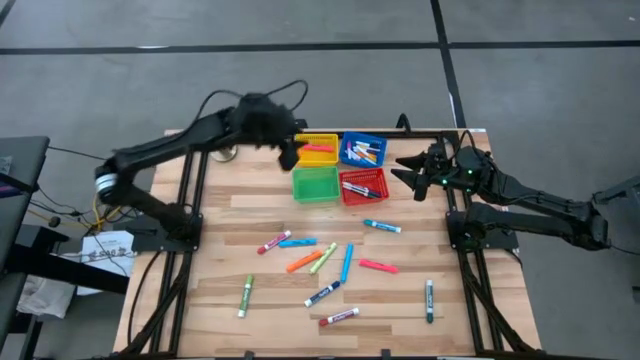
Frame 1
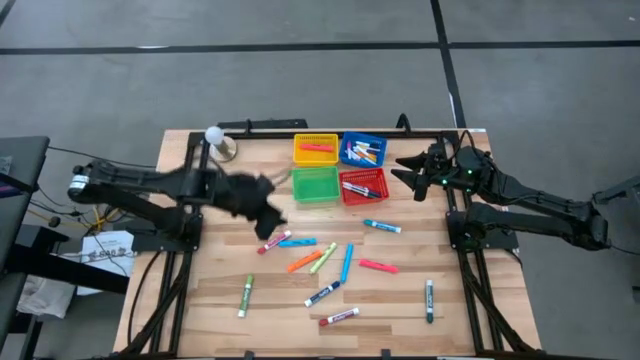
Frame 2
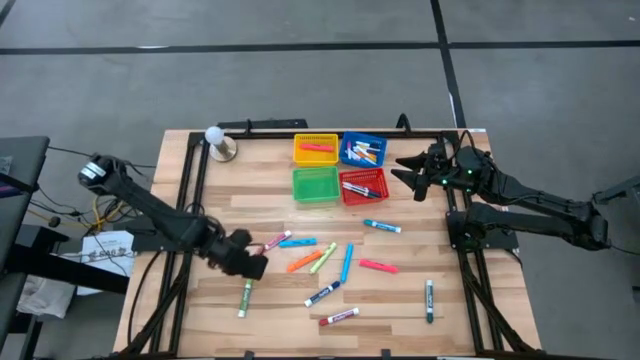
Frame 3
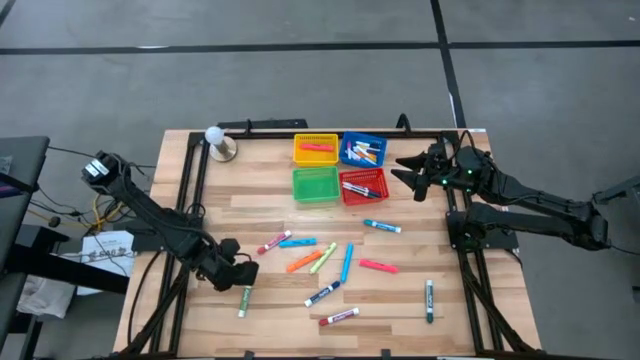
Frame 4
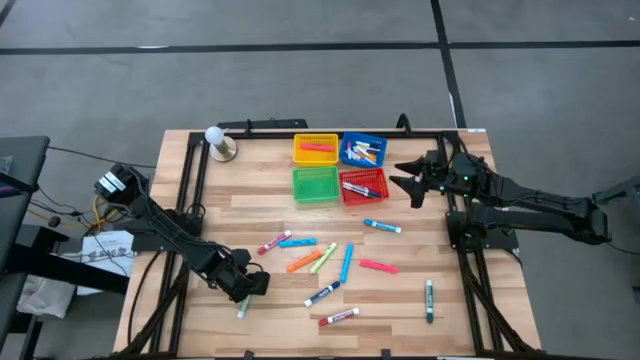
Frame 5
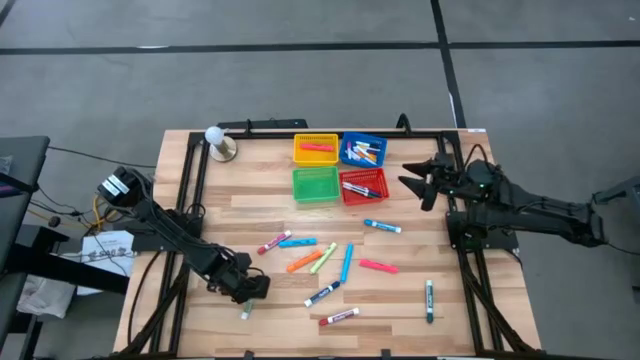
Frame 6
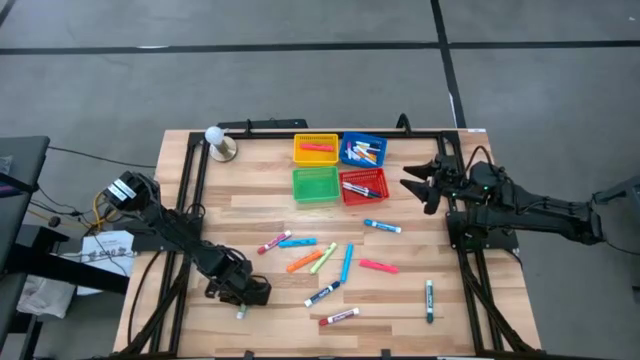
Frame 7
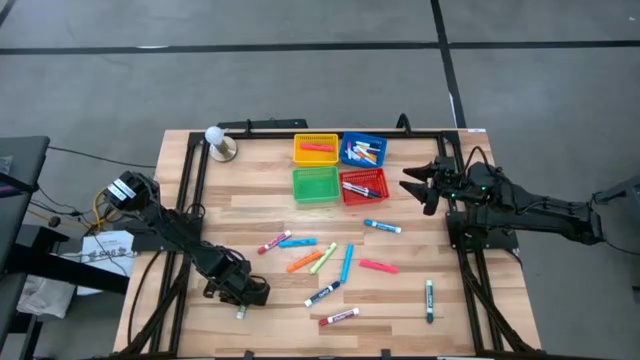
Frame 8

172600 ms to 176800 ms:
Task: Pick & Place Markers
Put the light blue highlighter into the yellow bin

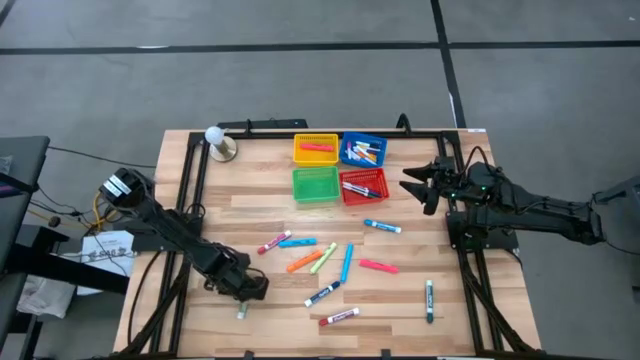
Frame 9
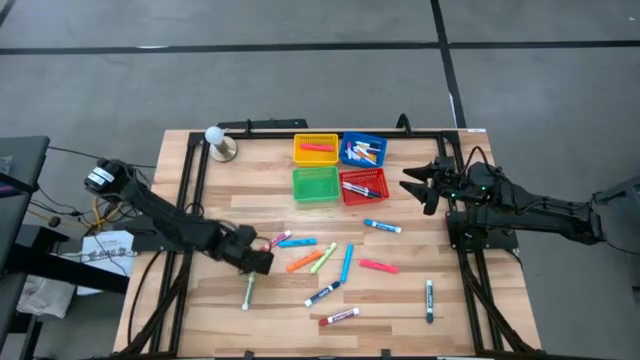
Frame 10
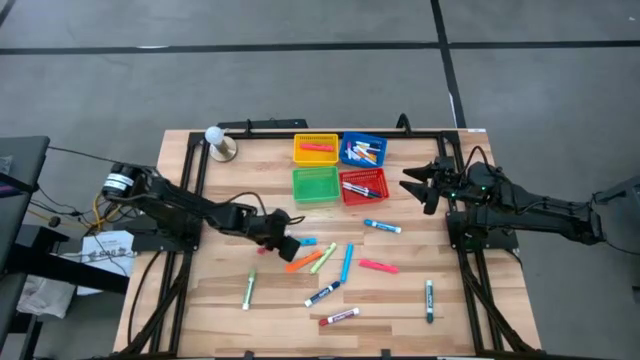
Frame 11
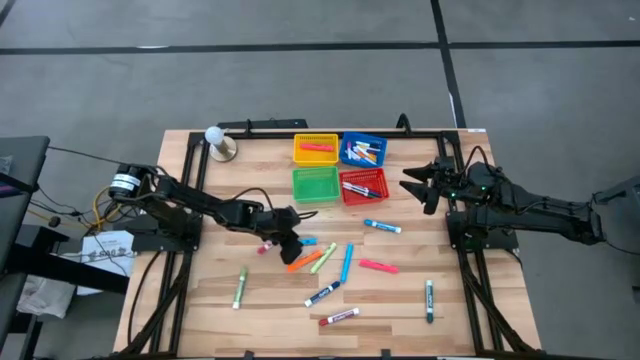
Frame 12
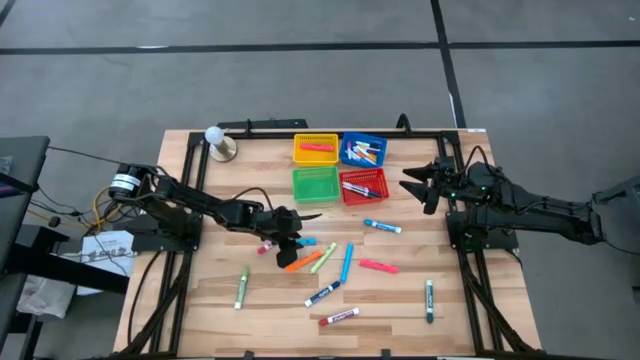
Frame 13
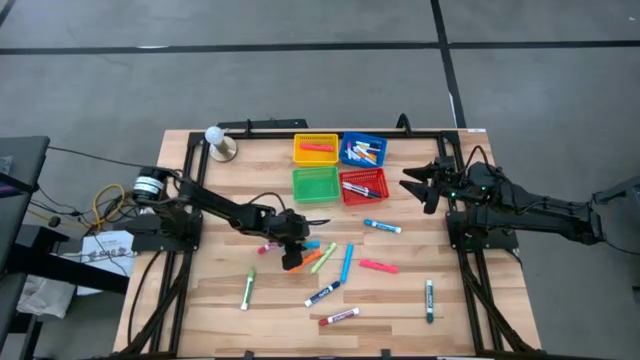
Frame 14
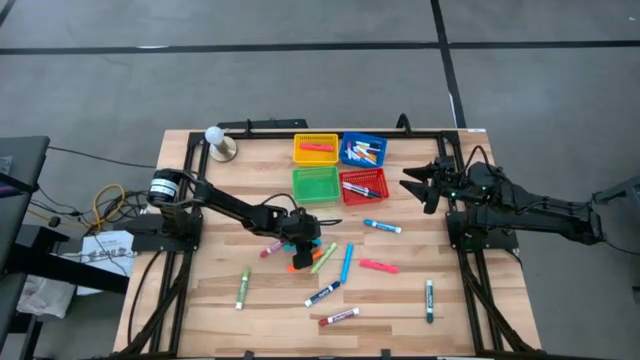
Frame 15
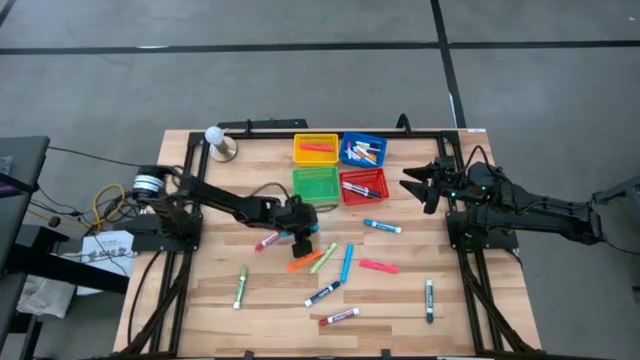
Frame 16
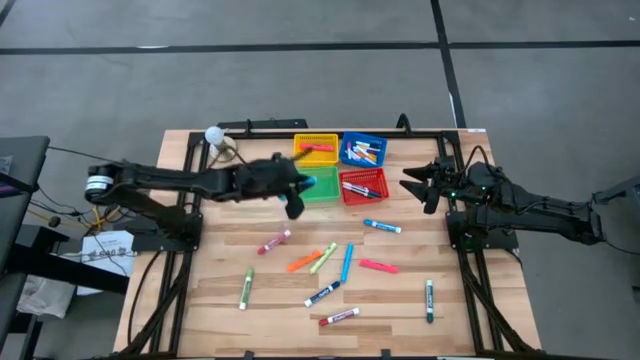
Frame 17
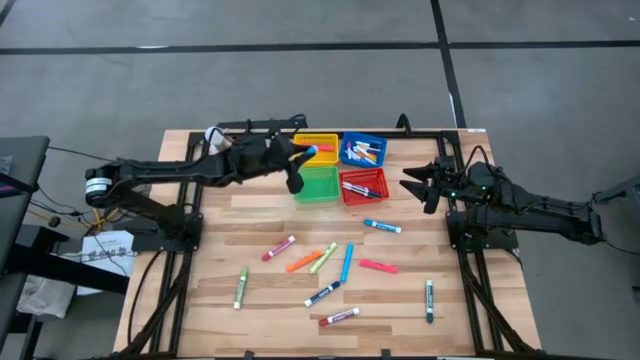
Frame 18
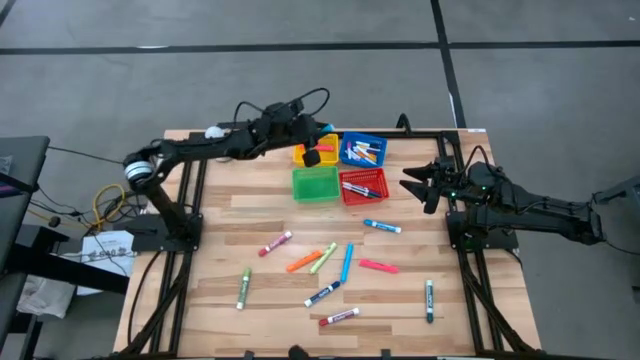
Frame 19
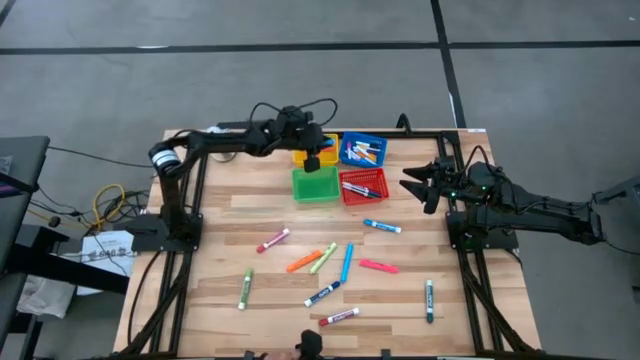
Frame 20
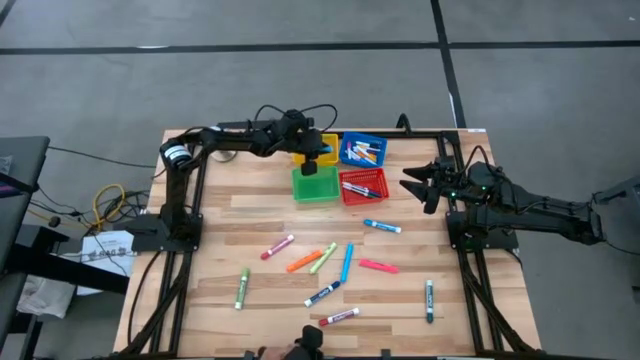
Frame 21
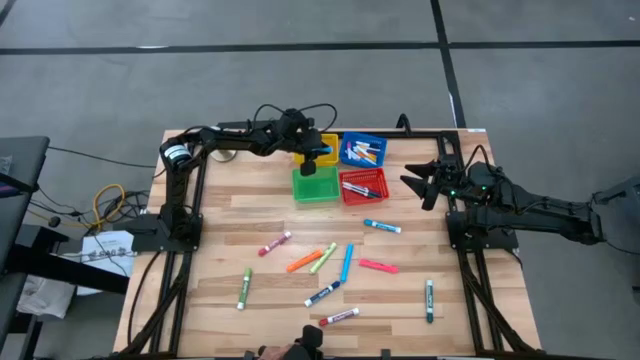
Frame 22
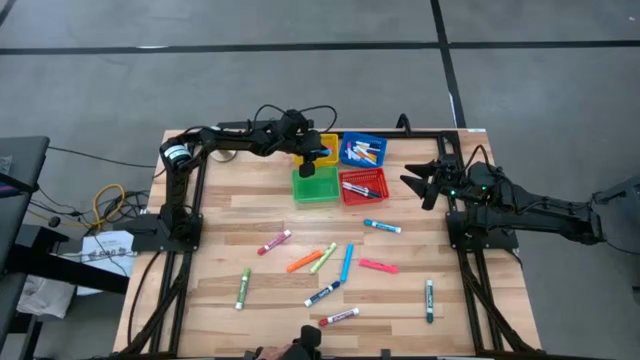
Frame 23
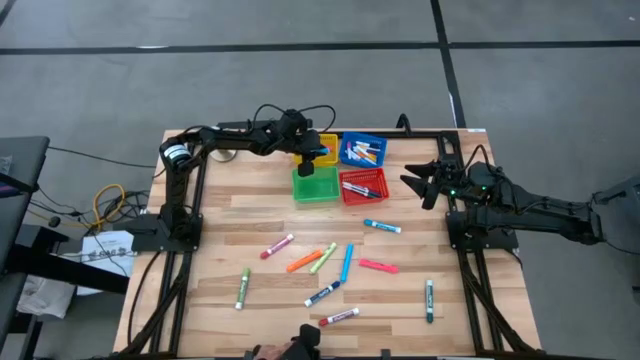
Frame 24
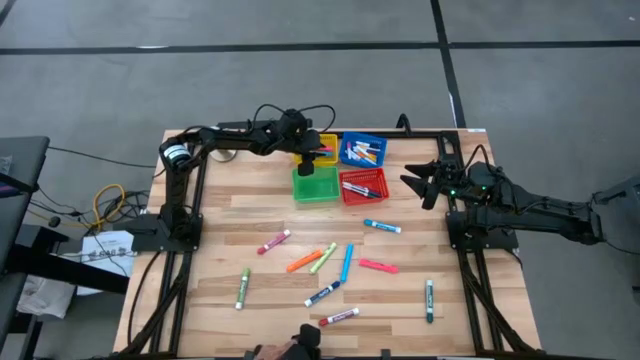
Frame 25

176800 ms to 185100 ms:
Put the light blue highlighter into the yellow bin

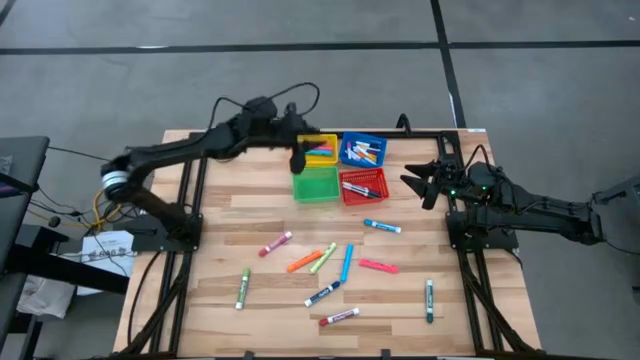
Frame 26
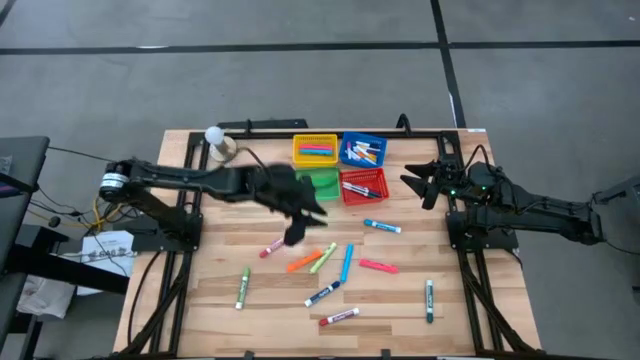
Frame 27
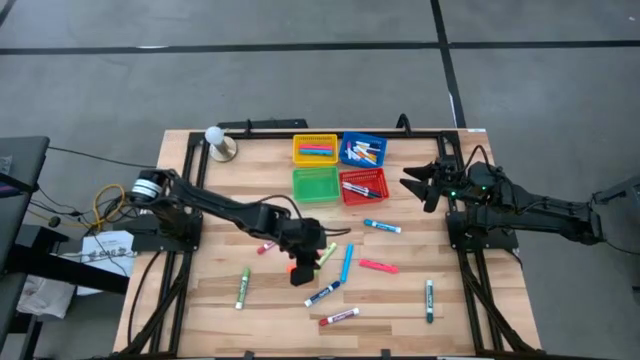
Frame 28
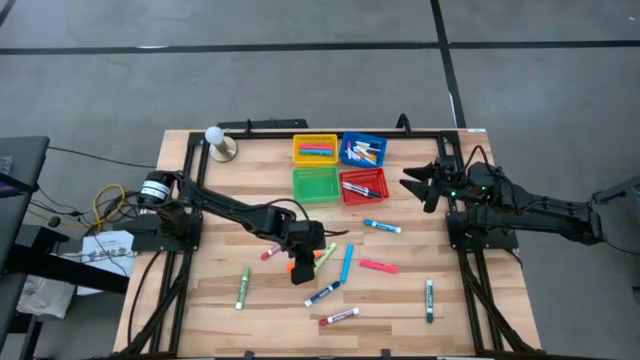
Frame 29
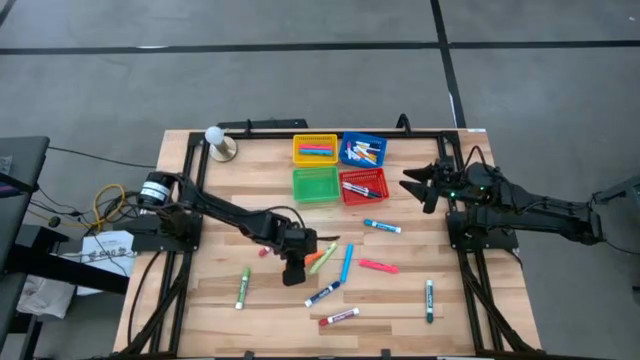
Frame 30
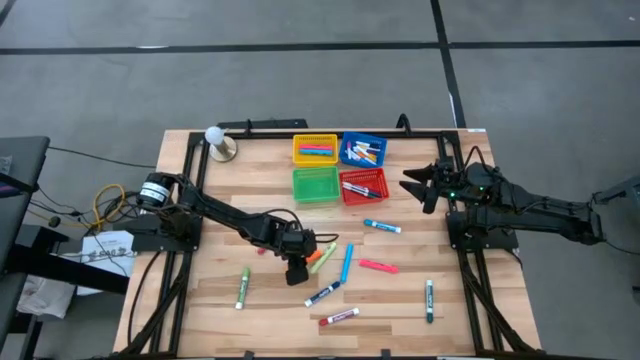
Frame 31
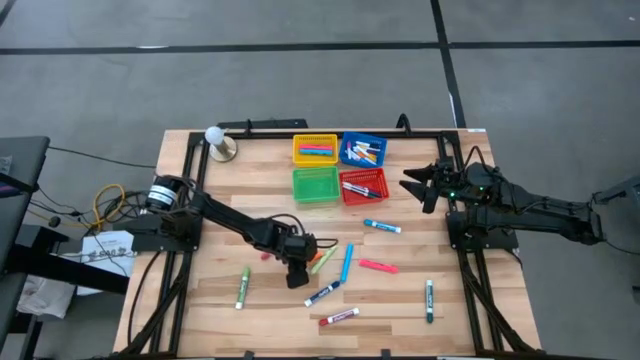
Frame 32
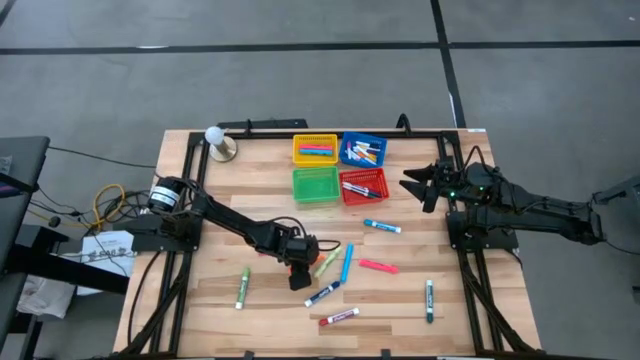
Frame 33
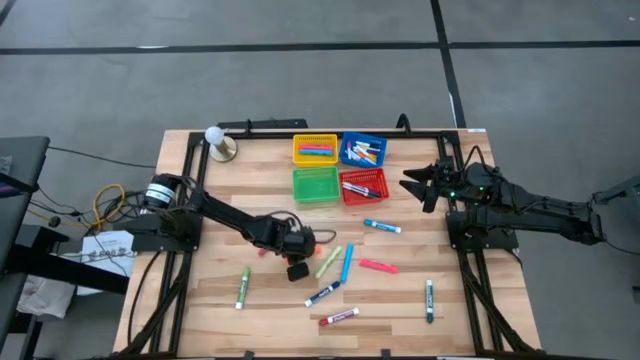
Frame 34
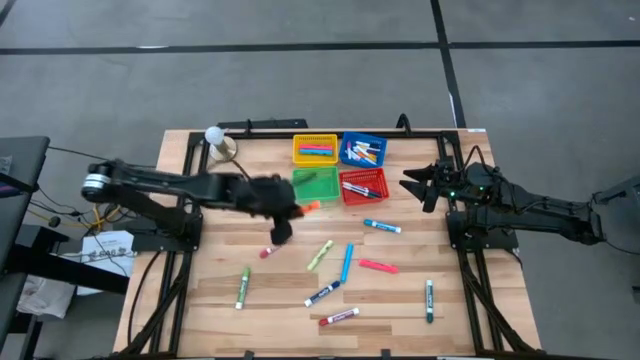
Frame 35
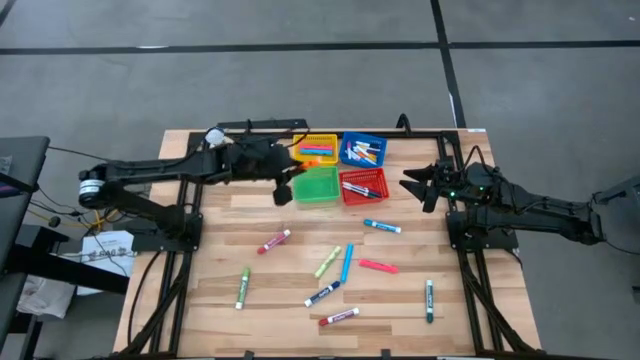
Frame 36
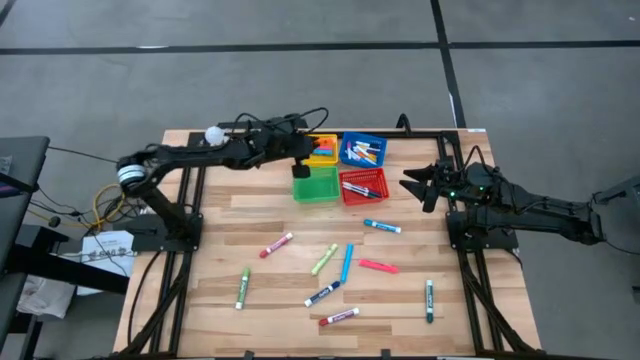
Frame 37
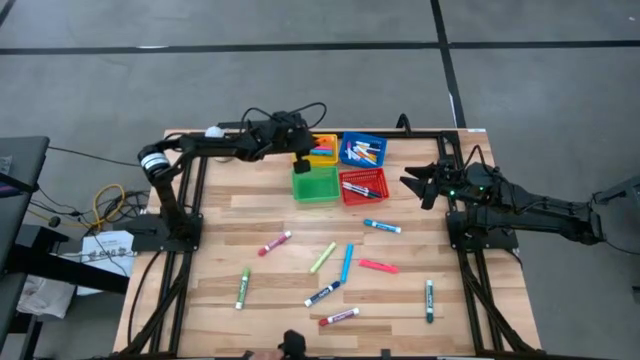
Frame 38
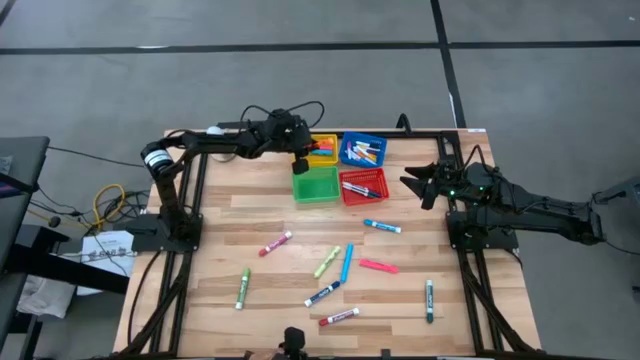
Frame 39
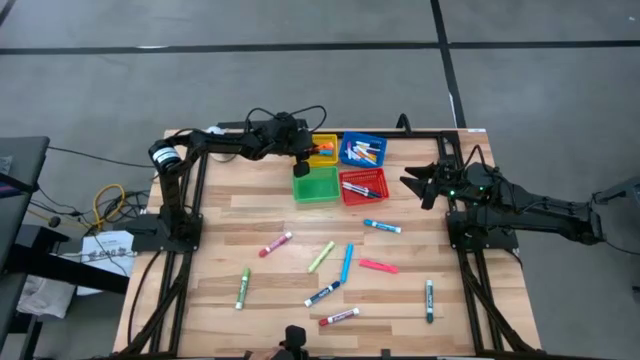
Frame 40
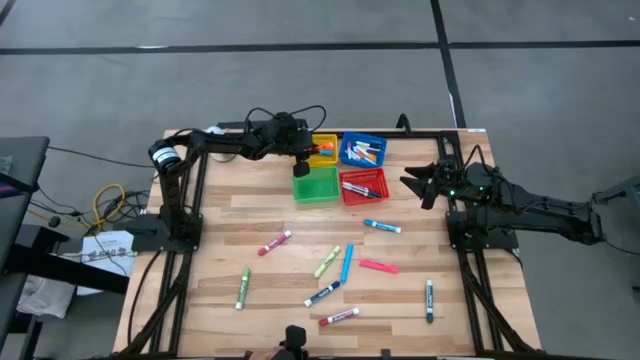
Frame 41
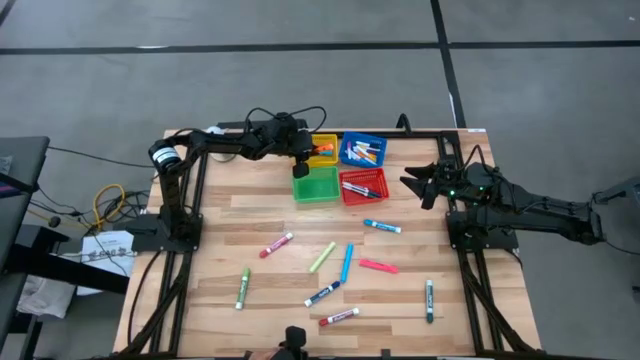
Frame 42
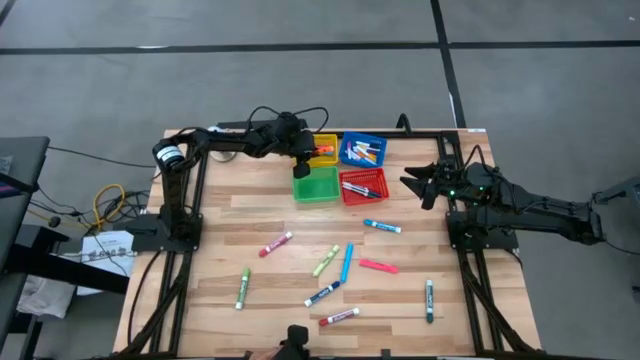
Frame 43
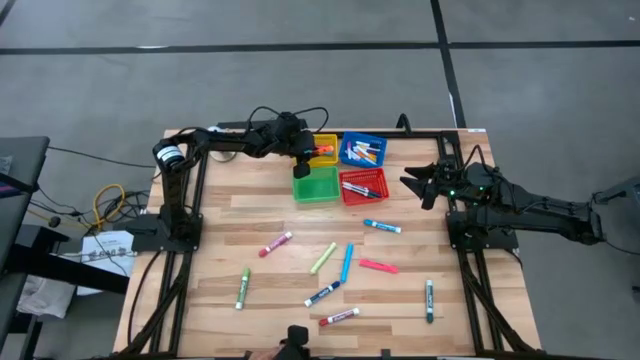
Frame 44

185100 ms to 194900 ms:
Put the orange highlighter into the yellow bin
